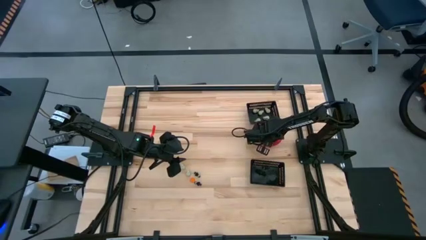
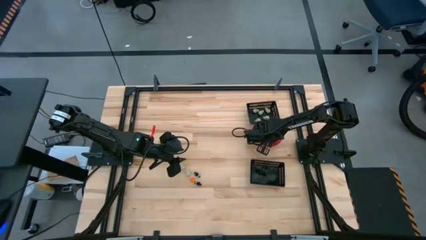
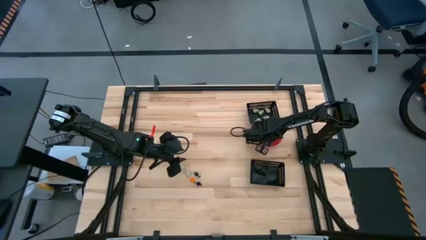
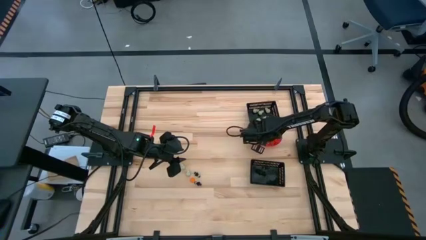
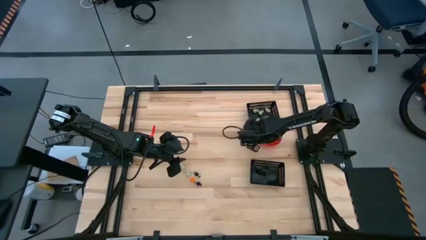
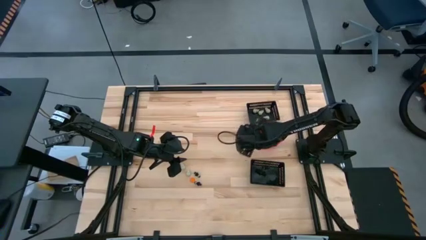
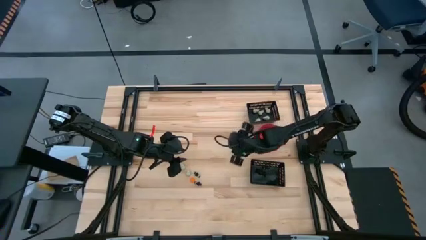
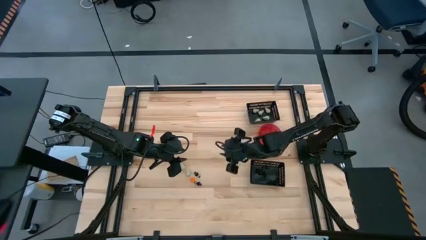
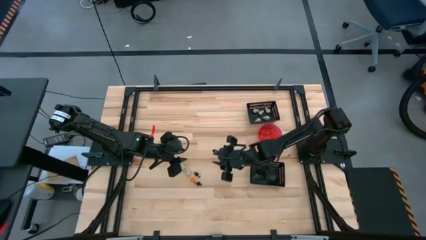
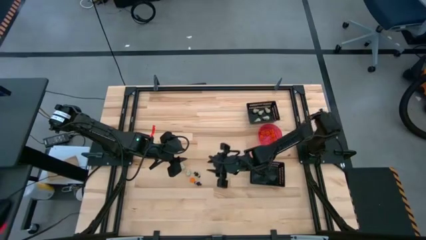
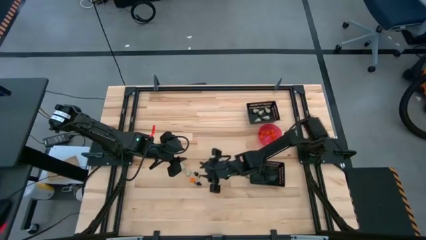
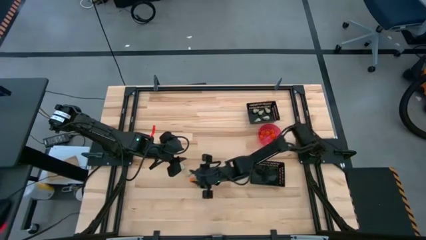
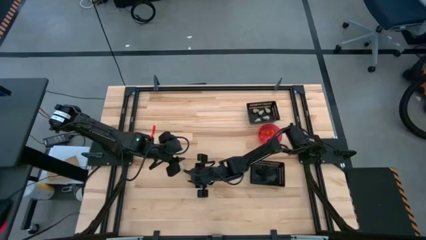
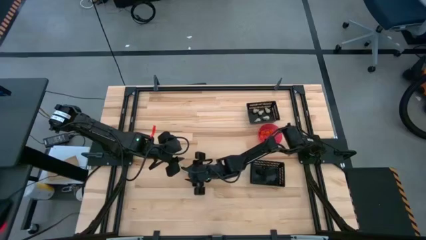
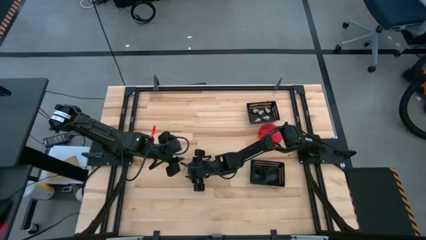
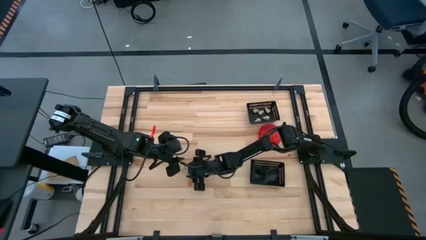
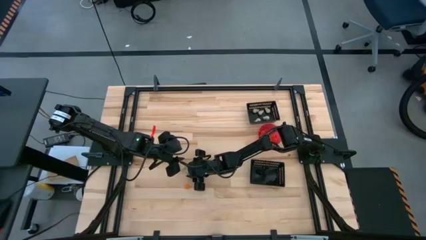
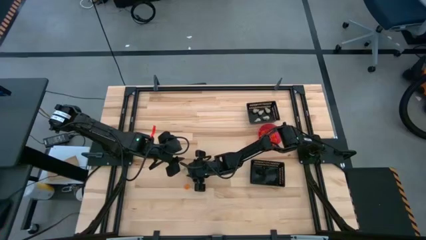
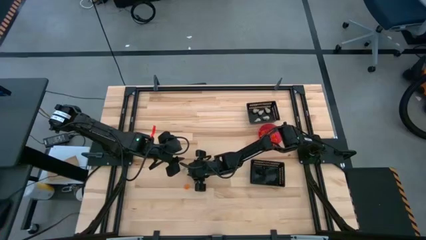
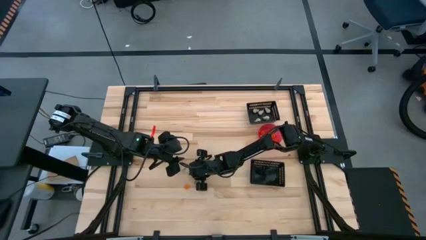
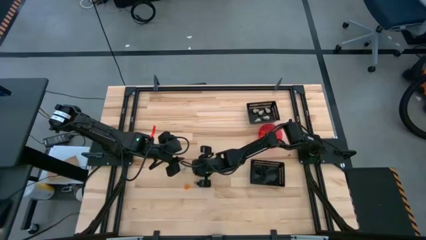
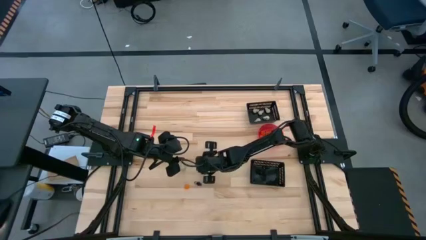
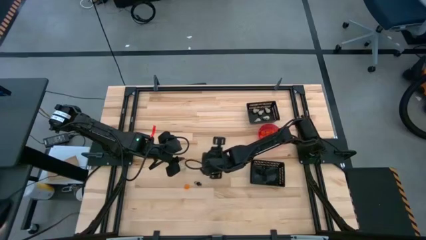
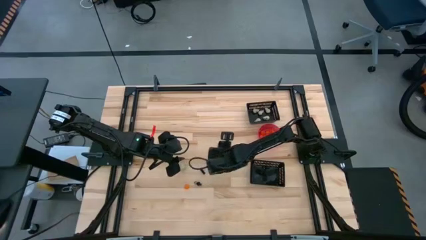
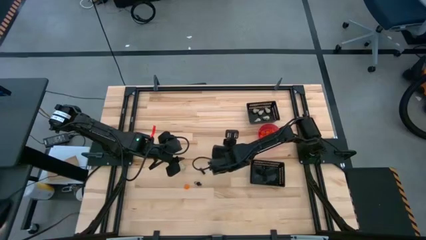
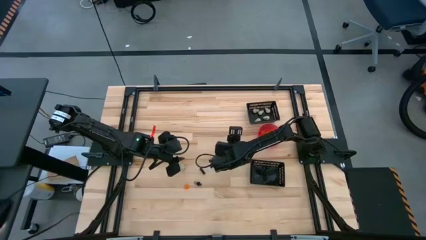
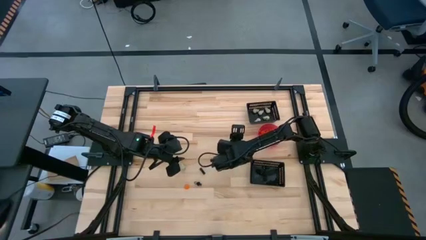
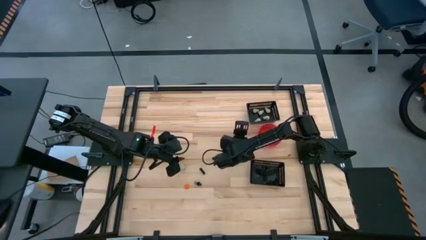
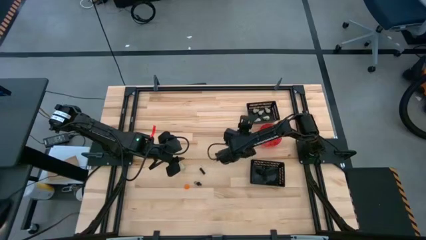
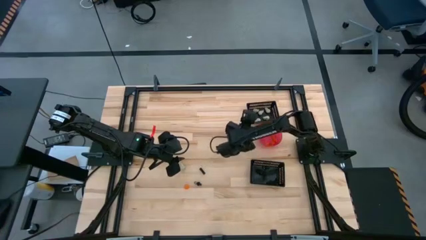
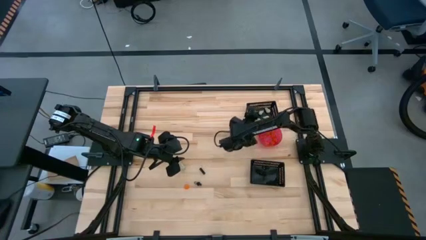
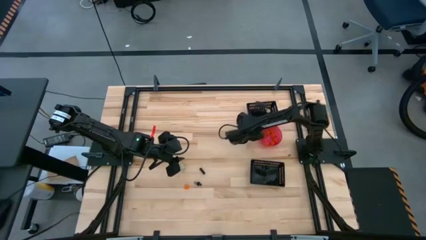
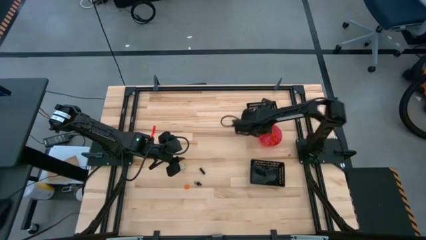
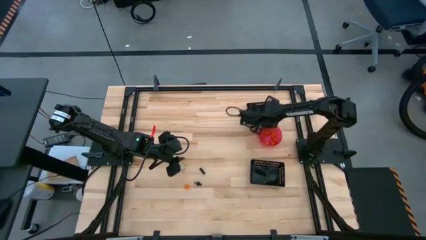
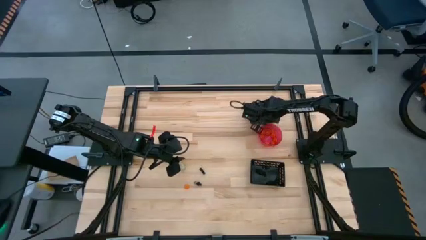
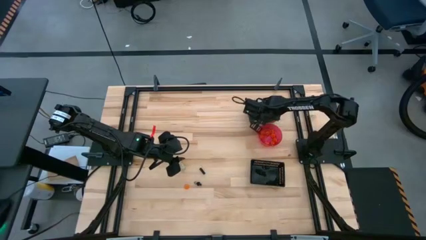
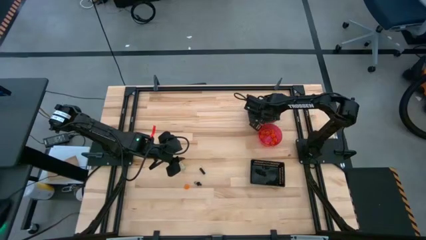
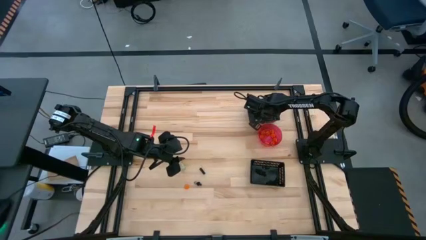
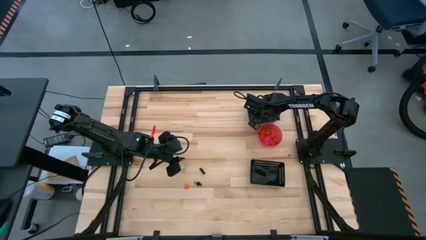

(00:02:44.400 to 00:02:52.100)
Task: Sort Halloween decoration
Put the white skull toy into the top black bin

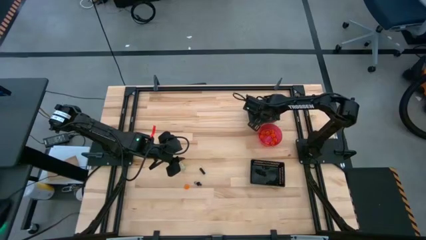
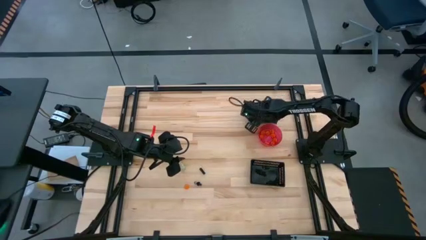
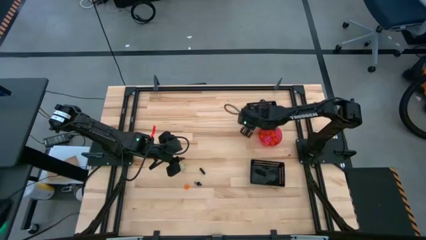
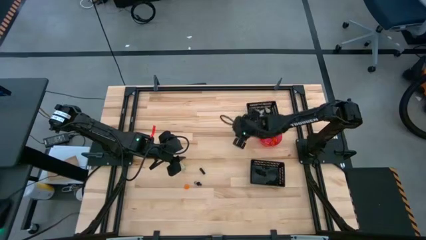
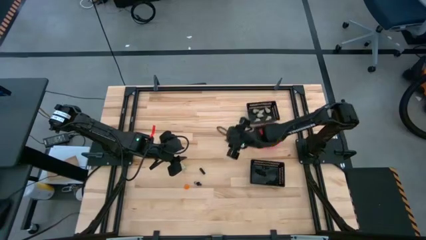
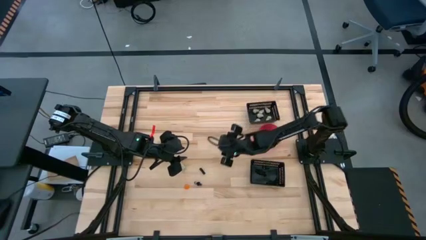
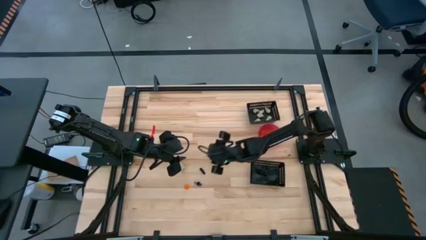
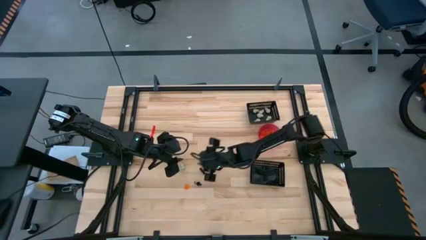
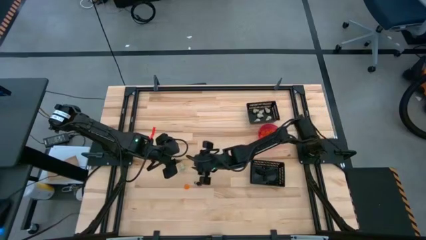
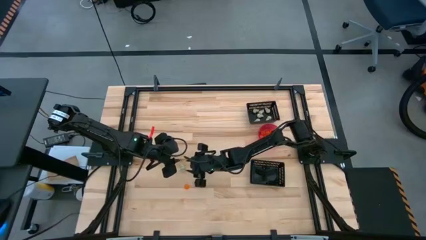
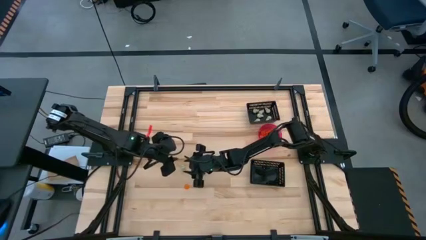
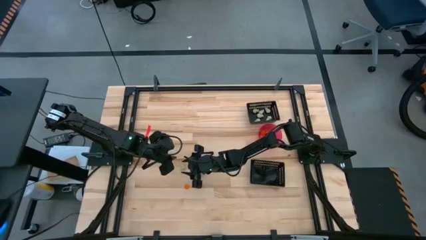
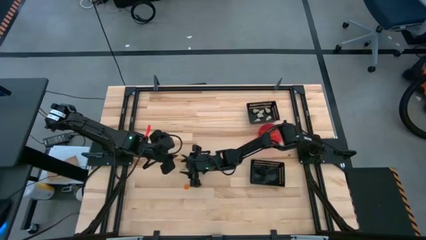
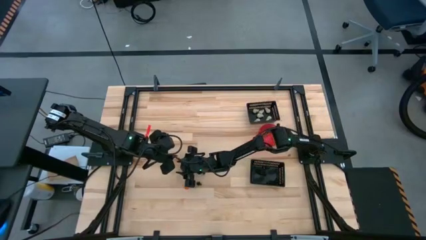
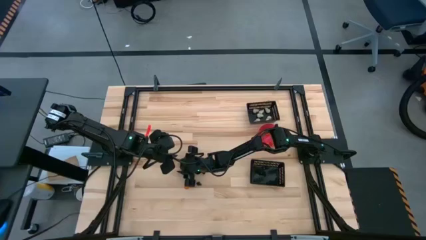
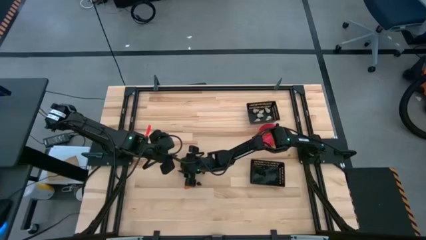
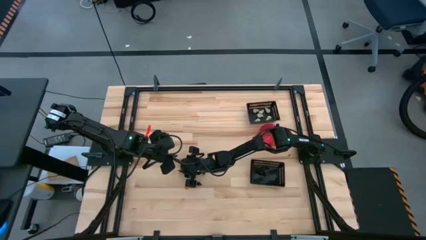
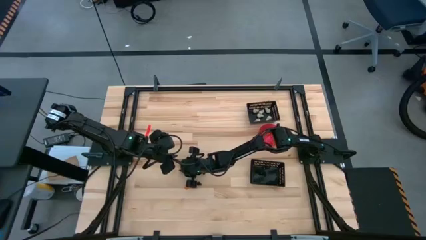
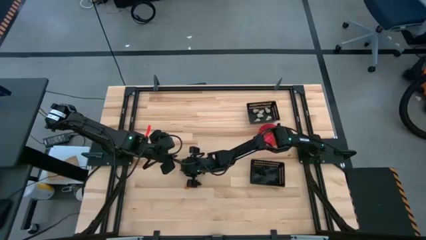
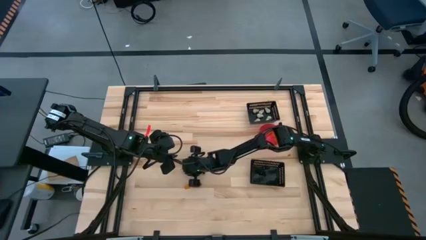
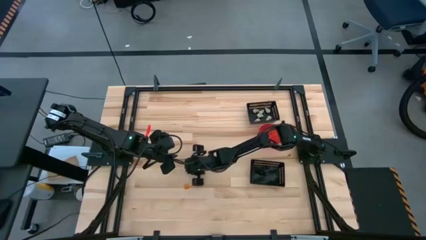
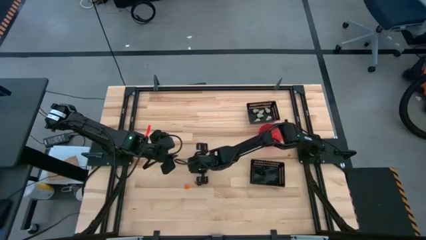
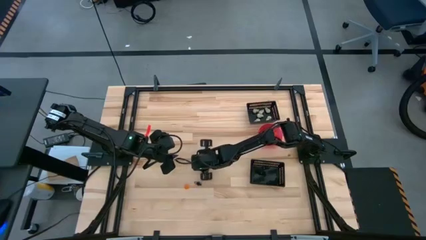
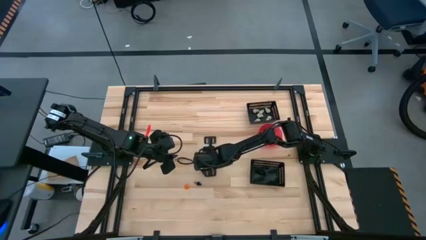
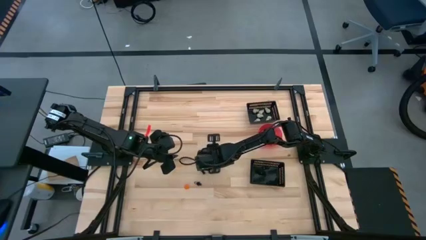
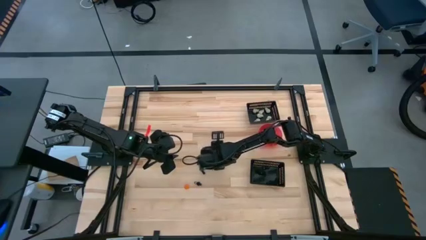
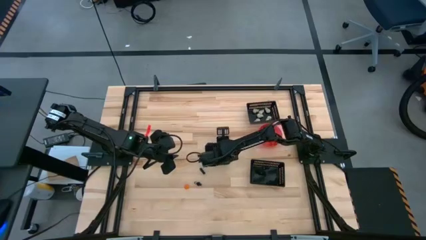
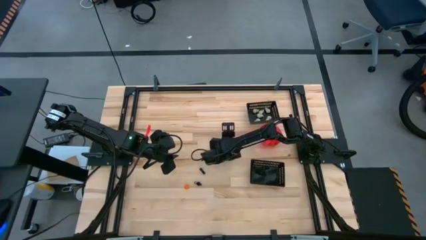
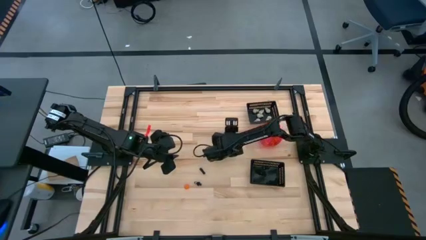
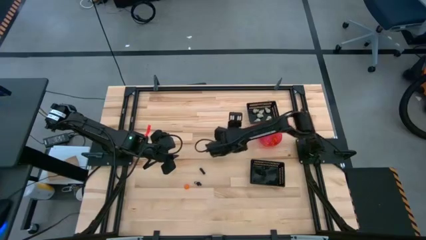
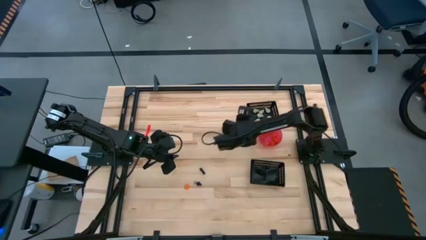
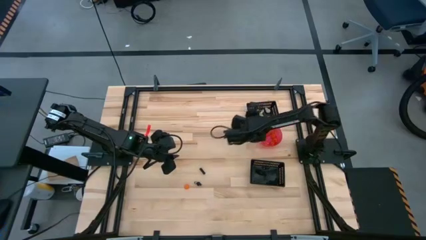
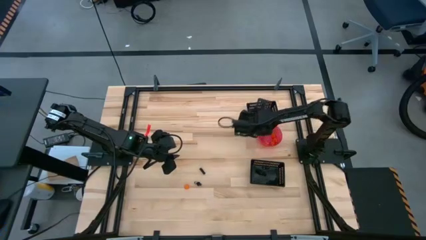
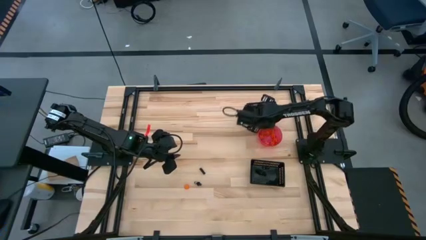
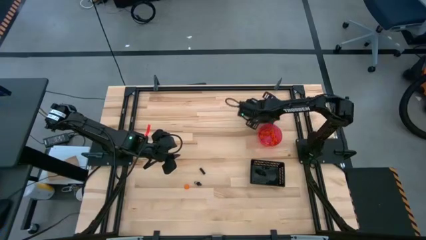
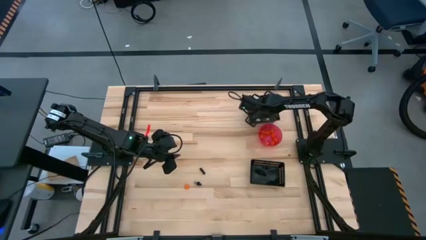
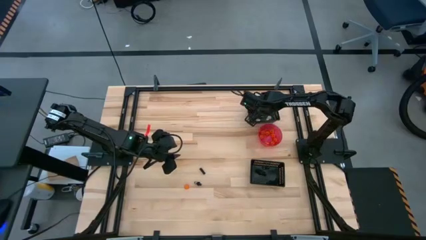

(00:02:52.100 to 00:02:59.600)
Put the white skull toy into the top black bin

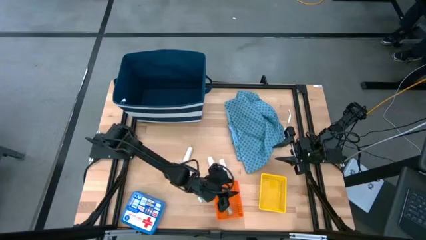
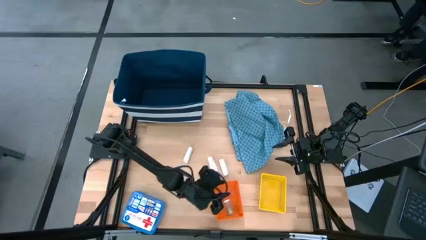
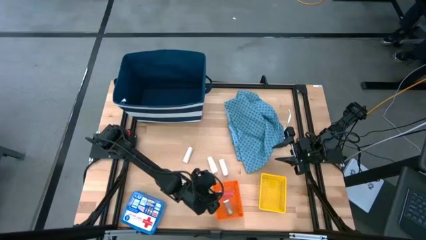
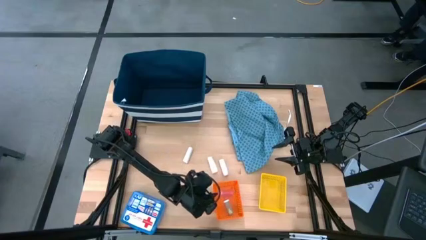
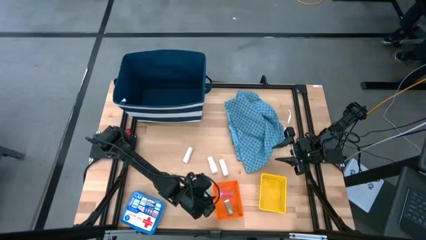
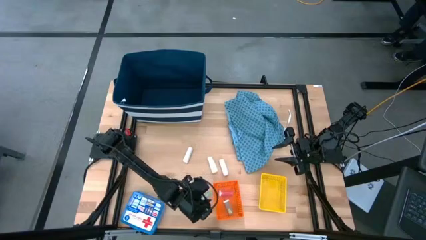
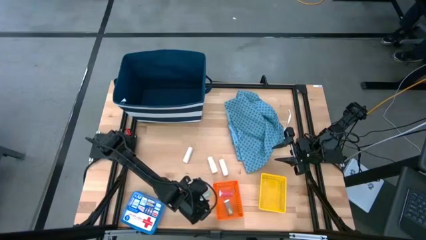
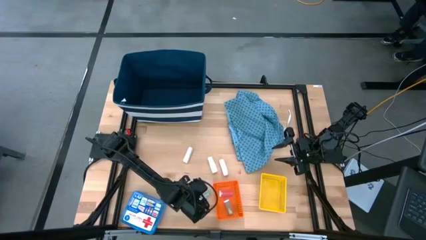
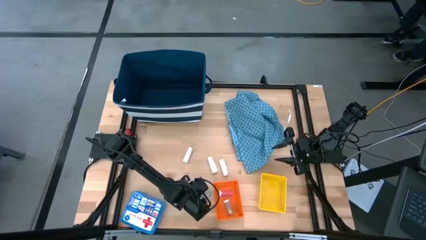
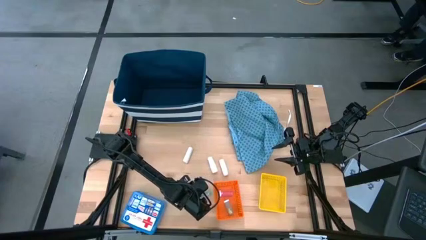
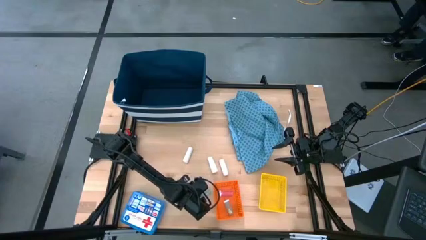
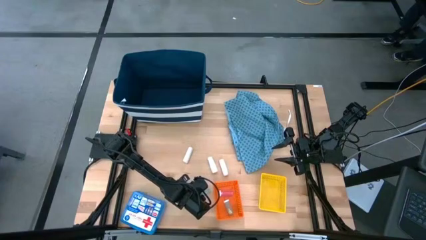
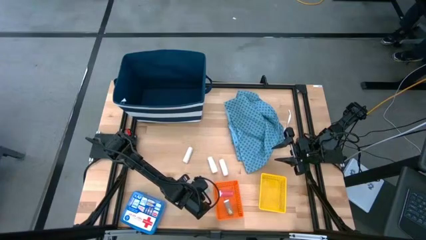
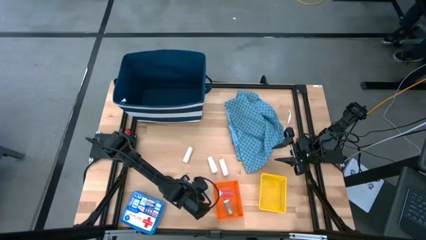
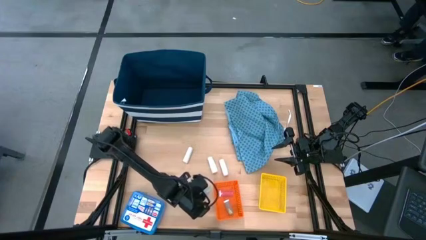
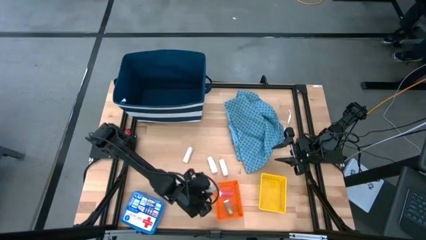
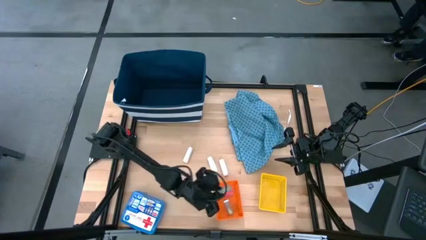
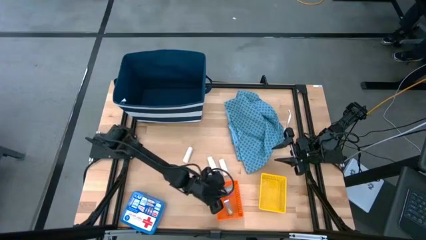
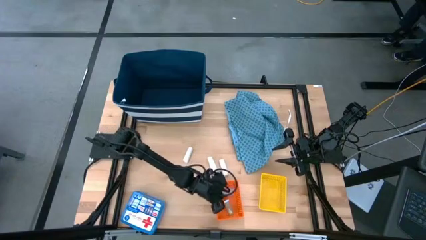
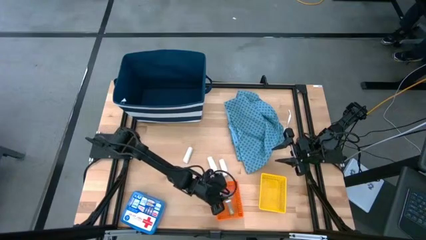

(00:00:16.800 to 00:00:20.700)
Task: Pick & Place Medicine items
Put the blue pill bottle into the orange bin
